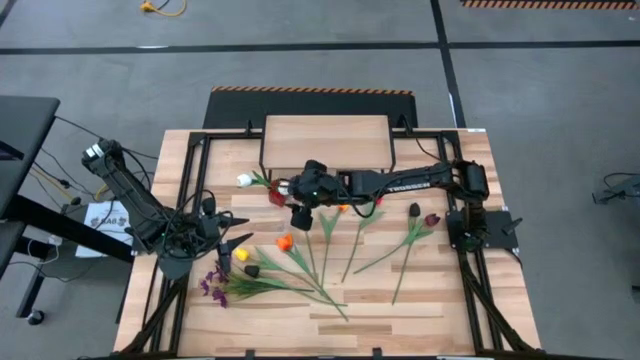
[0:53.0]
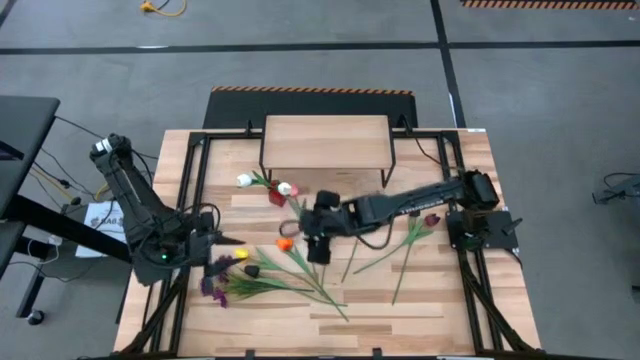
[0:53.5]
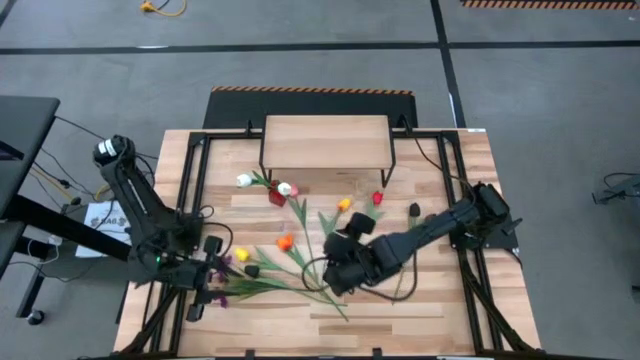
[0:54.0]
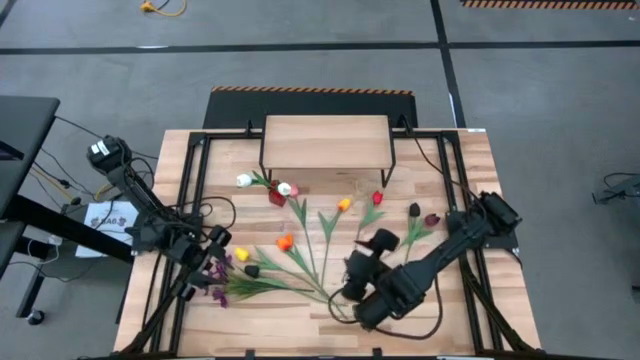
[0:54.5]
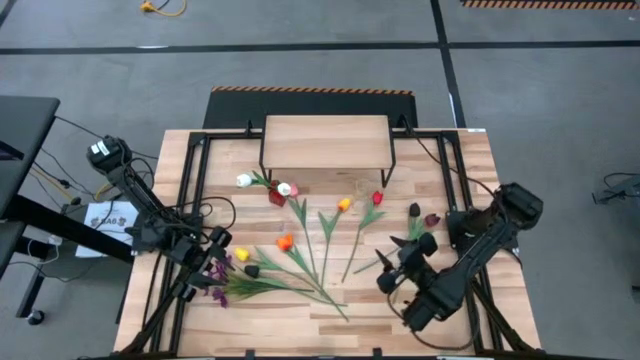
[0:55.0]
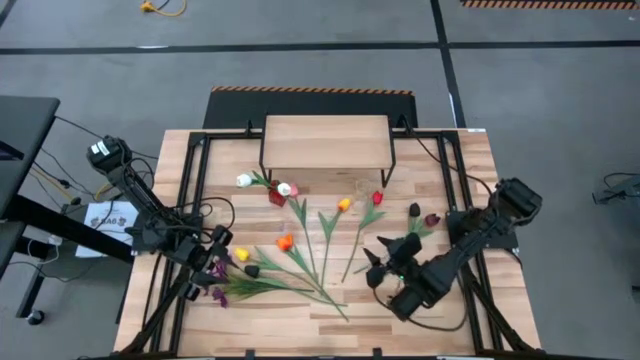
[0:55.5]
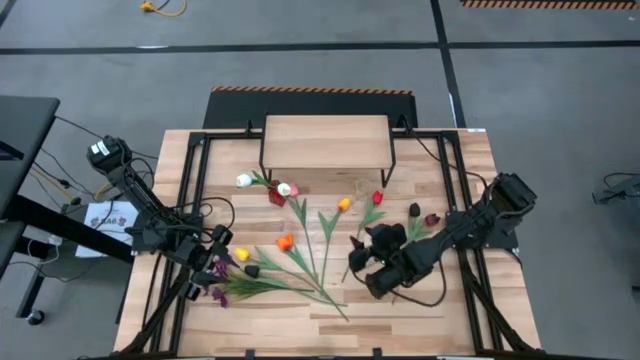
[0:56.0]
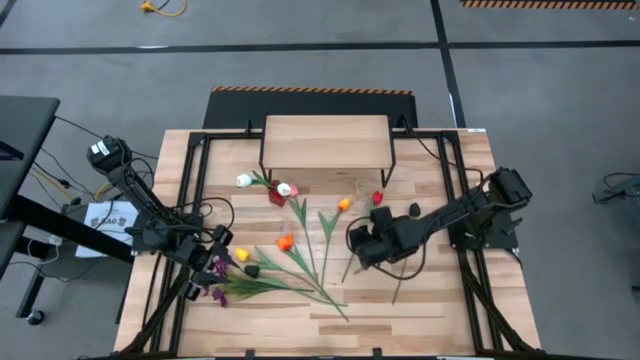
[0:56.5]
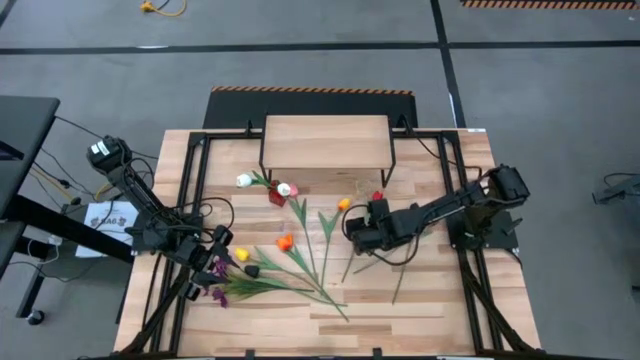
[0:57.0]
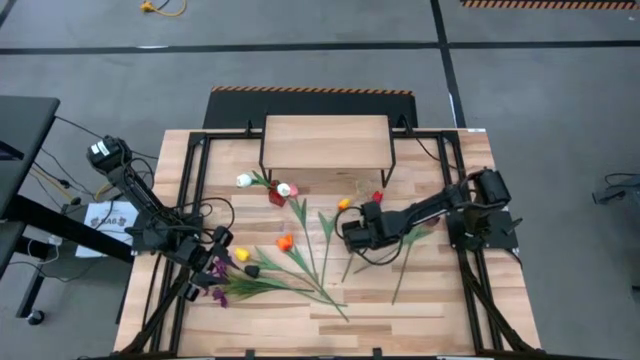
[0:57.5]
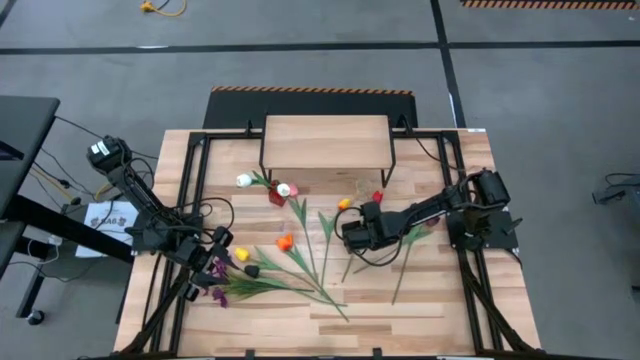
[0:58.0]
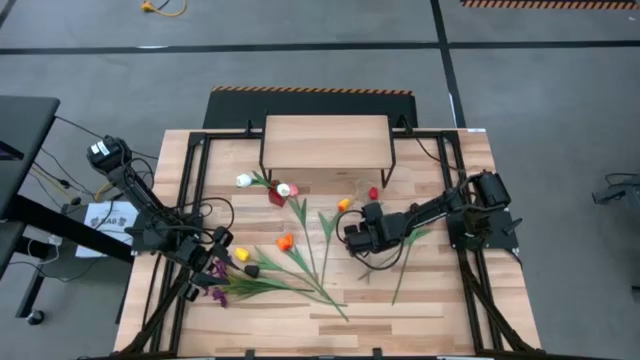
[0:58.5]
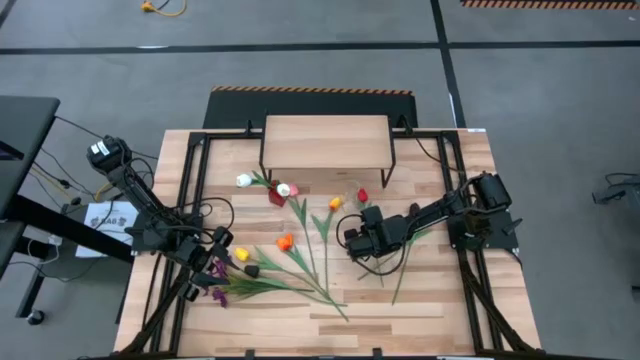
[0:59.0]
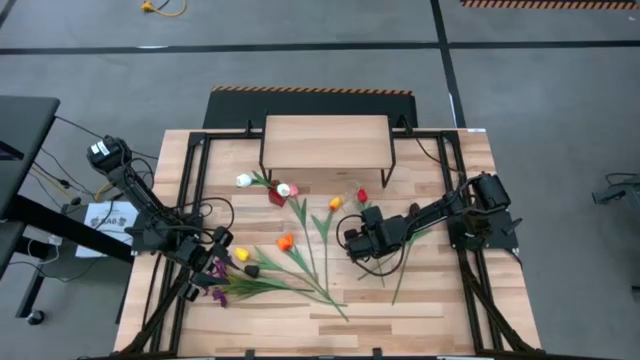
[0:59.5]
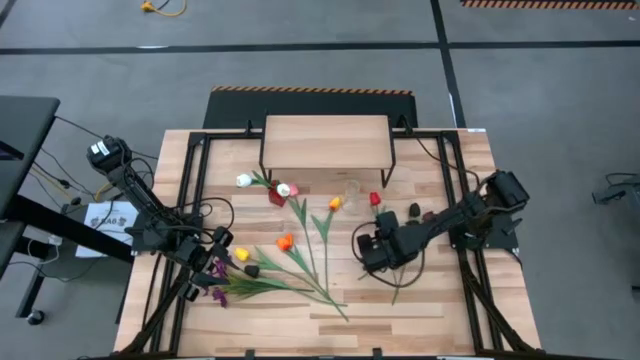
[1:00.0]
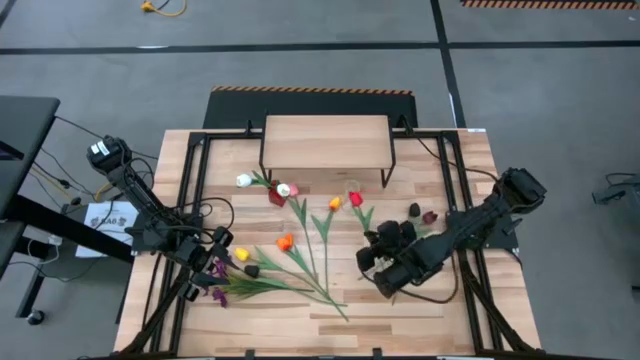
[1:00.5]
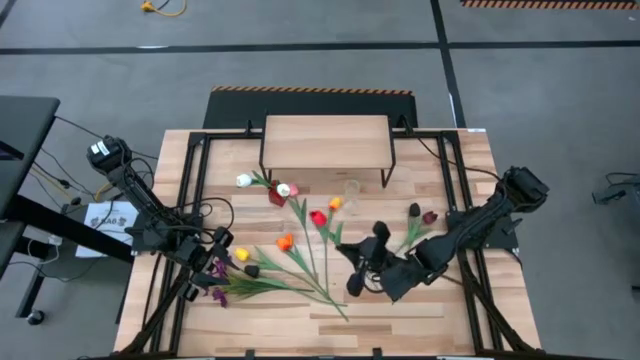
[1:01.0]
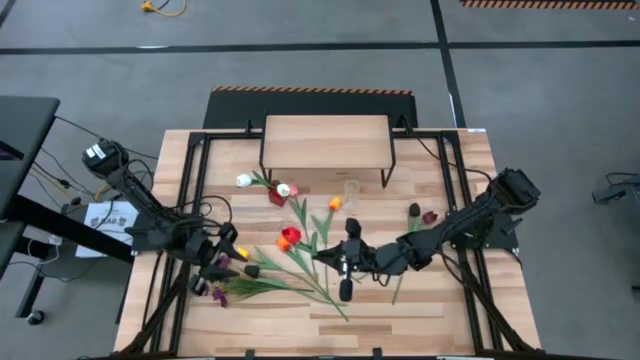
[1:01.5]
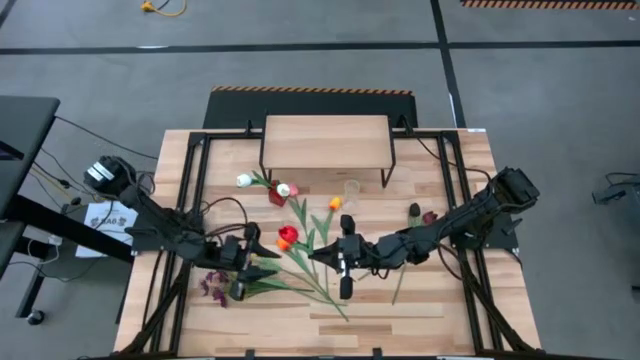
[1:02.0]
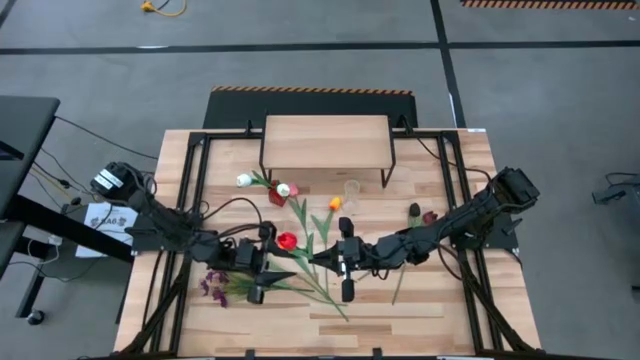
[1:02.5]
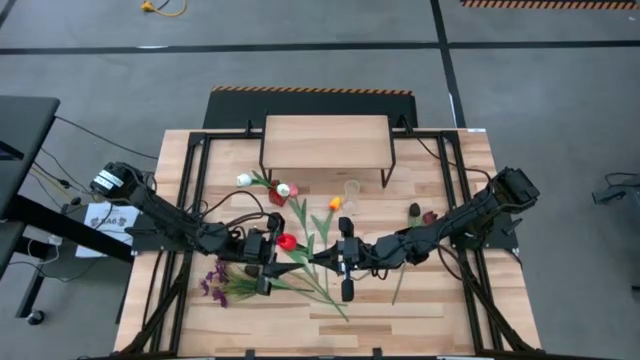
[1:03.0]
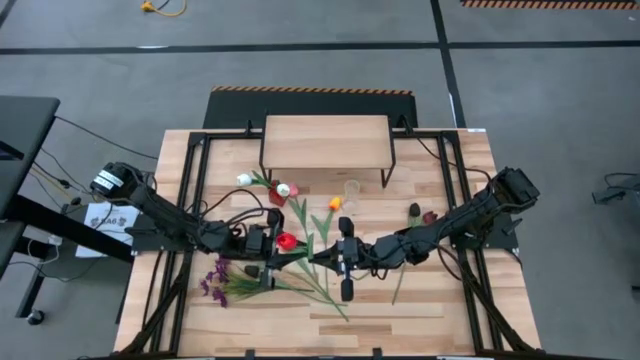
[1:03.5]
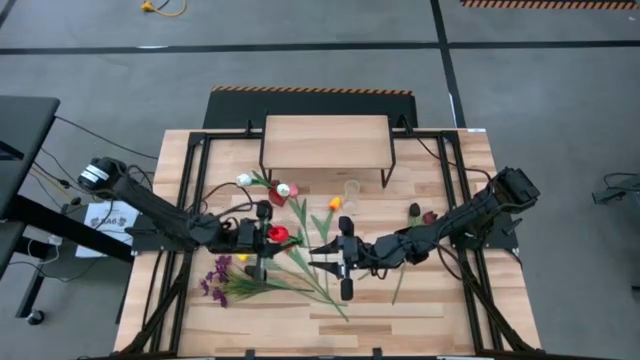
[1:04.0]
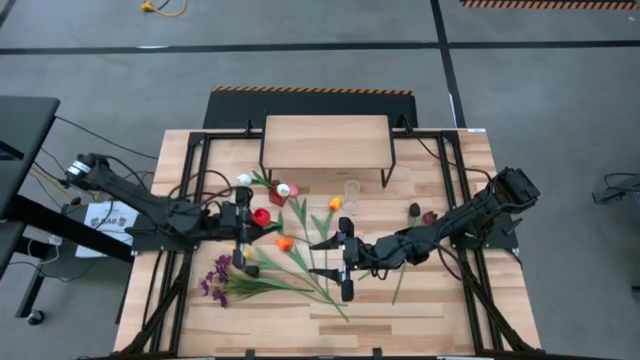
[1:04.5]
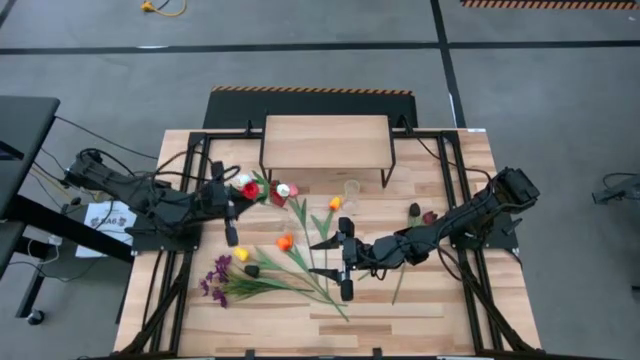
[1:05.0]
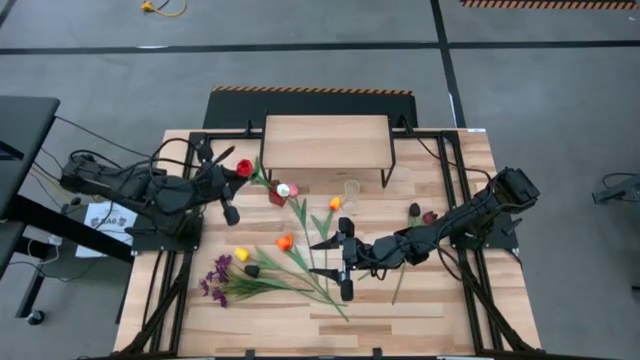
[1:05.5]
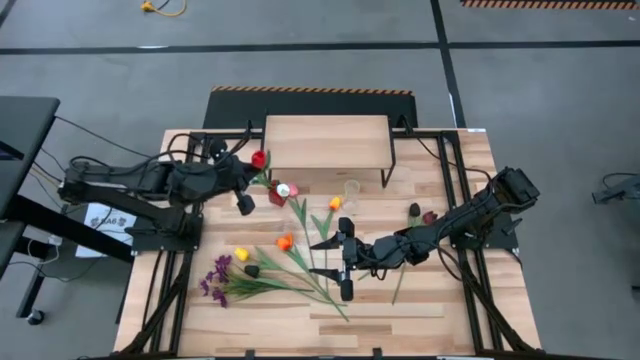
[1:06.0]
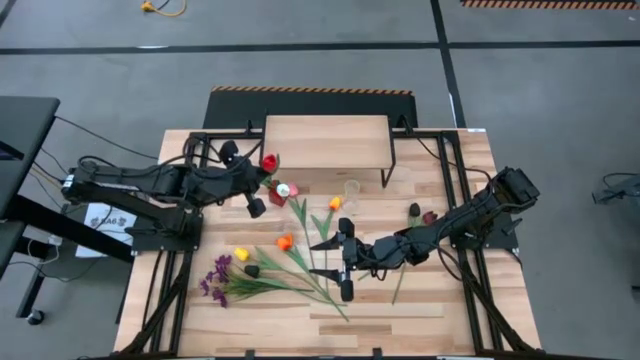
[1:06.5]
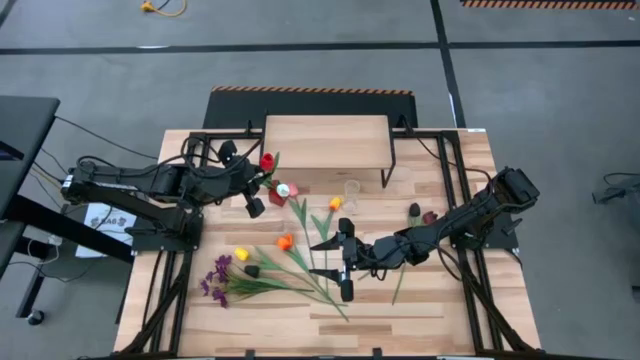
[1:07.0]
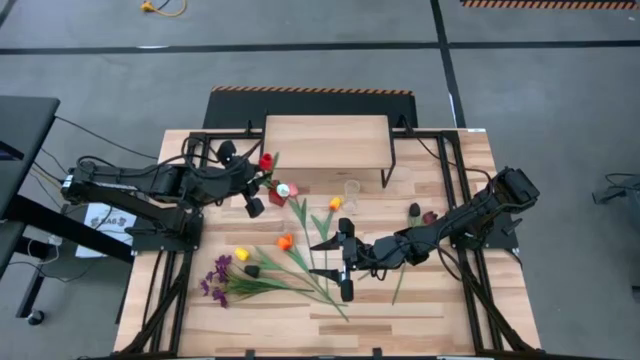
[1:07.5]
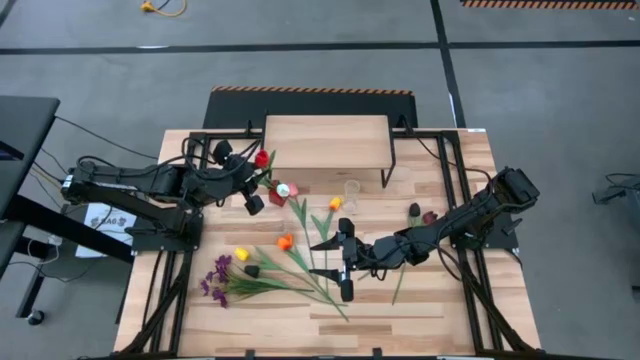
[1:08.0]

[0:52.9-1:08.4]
Task: Pick and place flowers into a vace then onto a shelf
Put the red flower into the red flower vase
